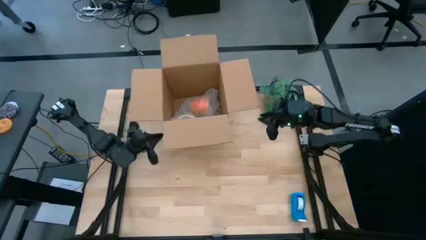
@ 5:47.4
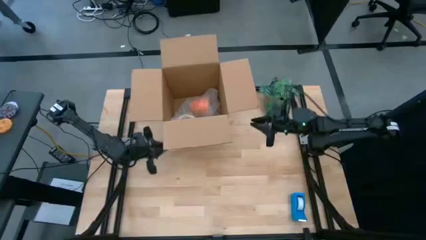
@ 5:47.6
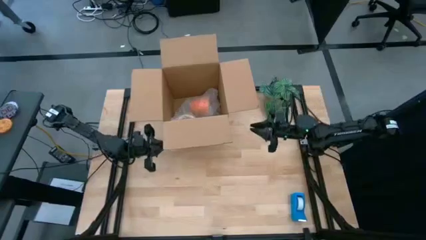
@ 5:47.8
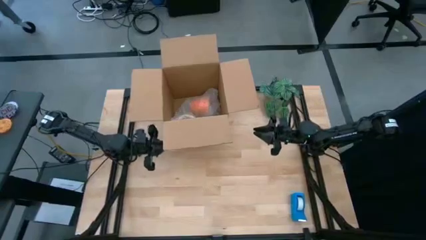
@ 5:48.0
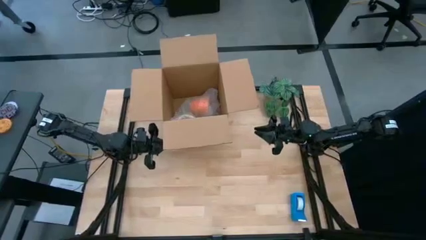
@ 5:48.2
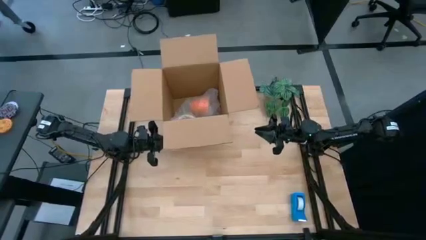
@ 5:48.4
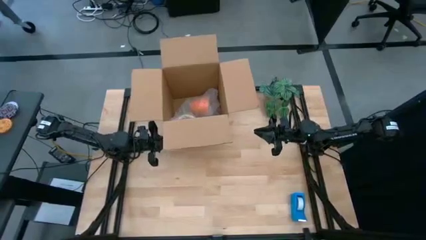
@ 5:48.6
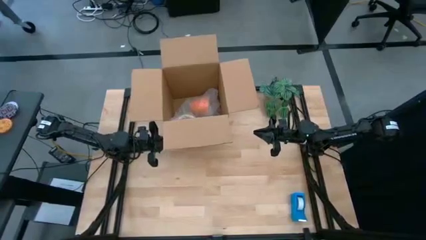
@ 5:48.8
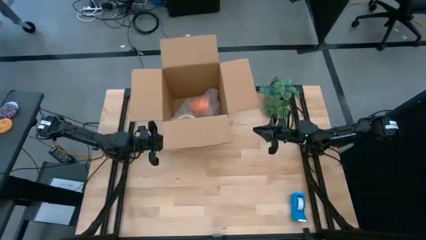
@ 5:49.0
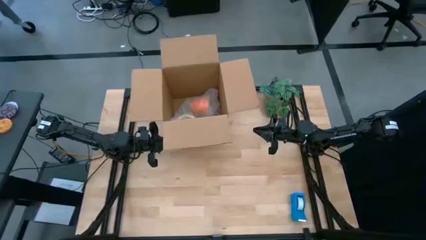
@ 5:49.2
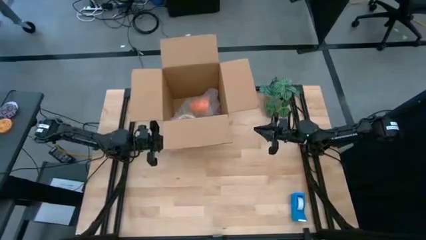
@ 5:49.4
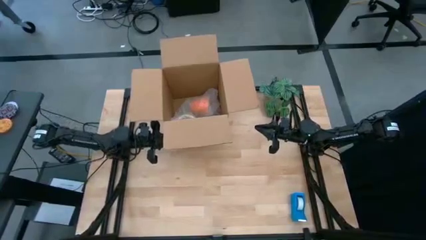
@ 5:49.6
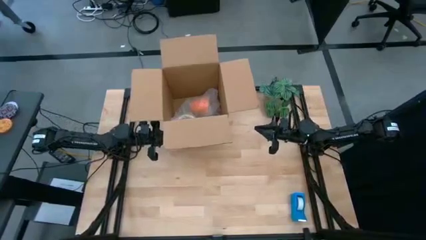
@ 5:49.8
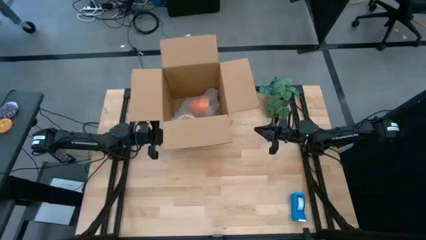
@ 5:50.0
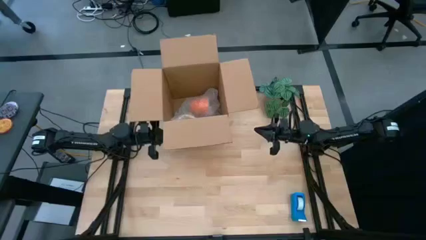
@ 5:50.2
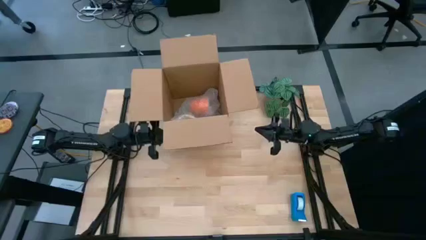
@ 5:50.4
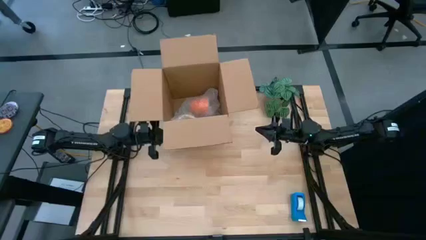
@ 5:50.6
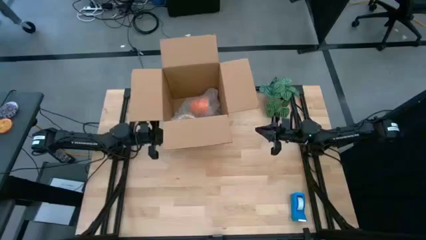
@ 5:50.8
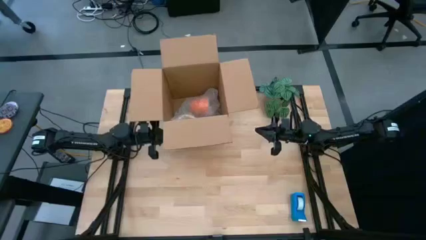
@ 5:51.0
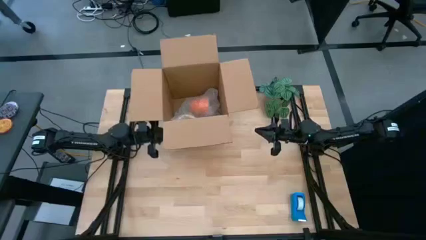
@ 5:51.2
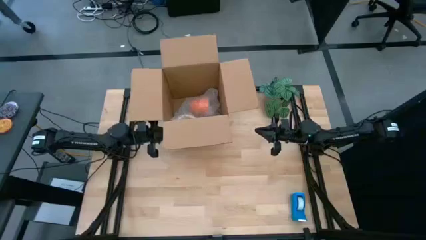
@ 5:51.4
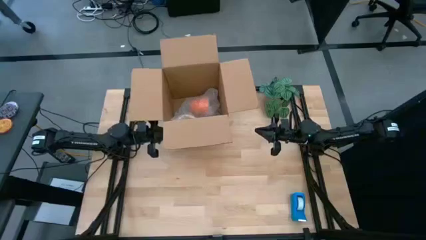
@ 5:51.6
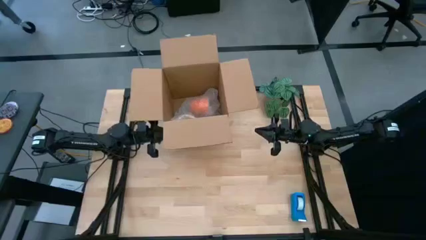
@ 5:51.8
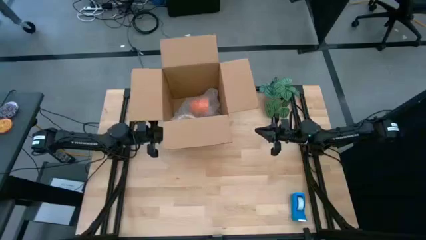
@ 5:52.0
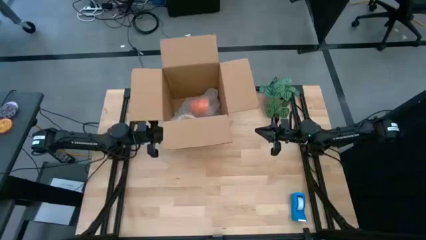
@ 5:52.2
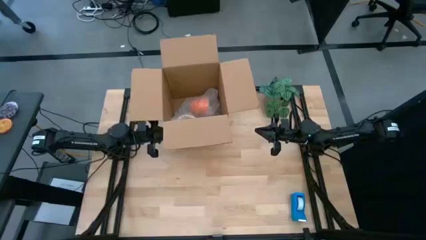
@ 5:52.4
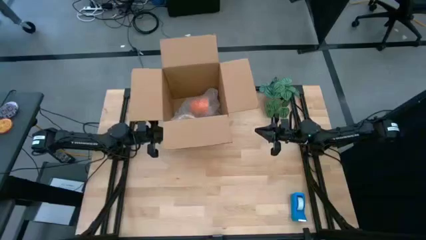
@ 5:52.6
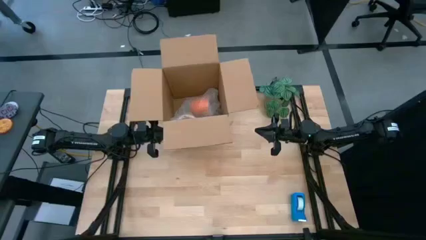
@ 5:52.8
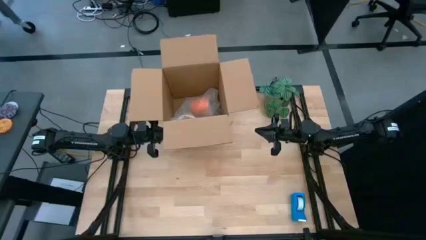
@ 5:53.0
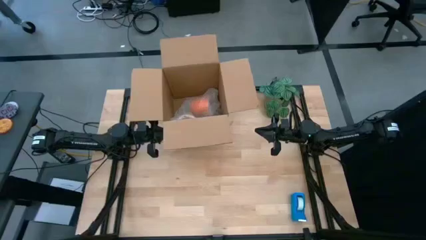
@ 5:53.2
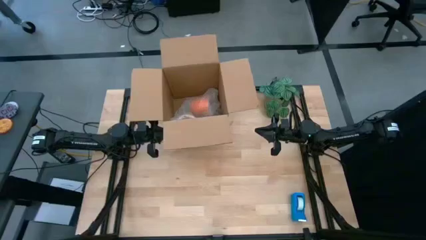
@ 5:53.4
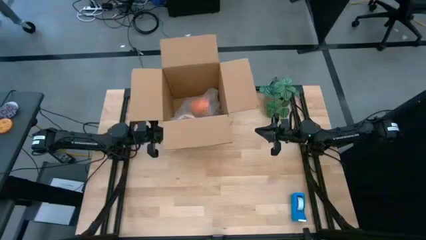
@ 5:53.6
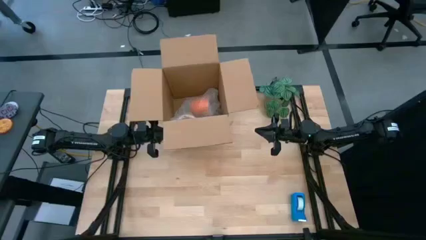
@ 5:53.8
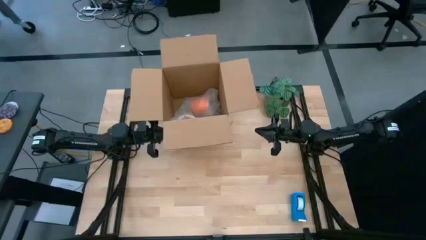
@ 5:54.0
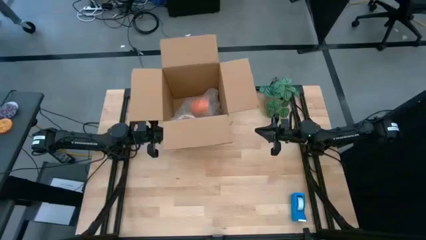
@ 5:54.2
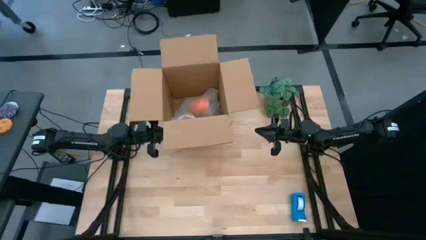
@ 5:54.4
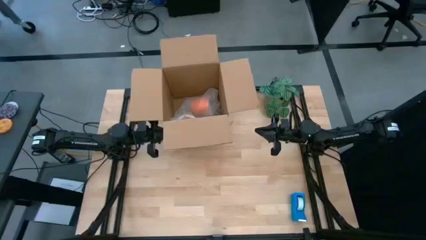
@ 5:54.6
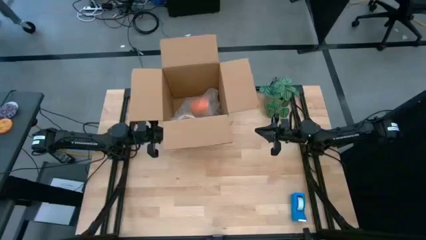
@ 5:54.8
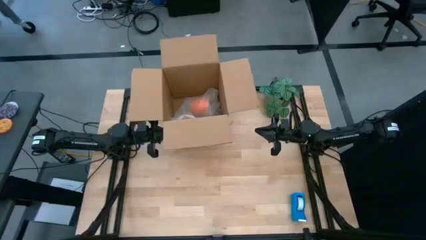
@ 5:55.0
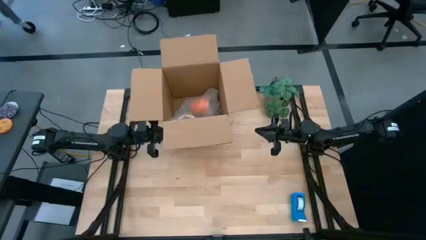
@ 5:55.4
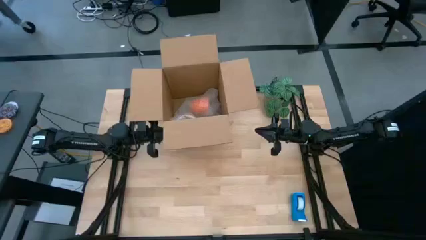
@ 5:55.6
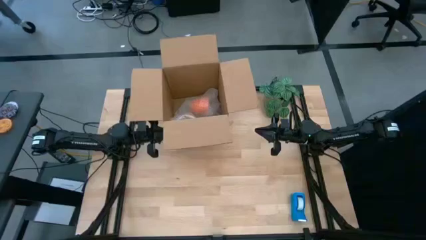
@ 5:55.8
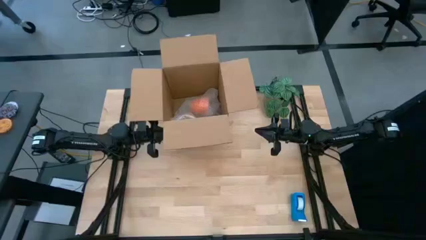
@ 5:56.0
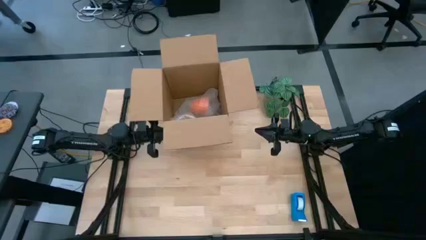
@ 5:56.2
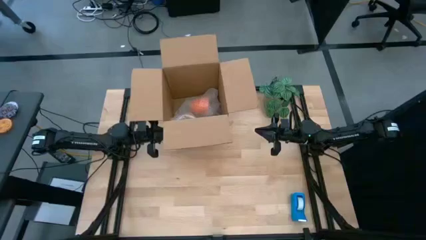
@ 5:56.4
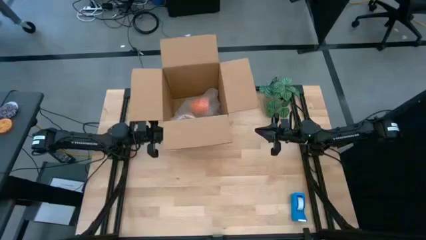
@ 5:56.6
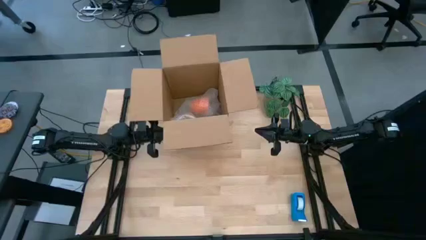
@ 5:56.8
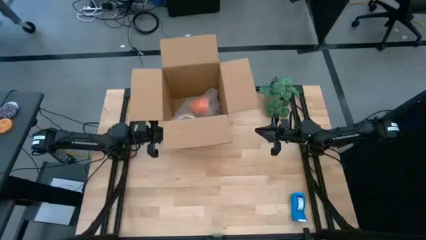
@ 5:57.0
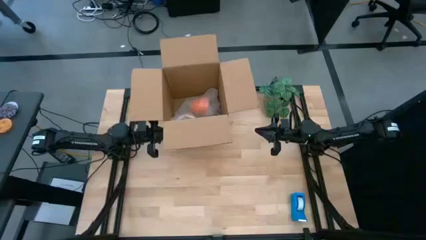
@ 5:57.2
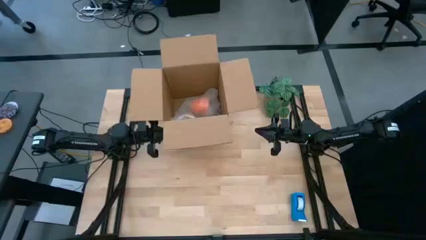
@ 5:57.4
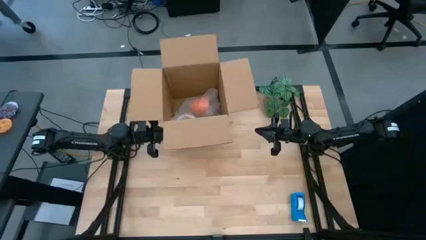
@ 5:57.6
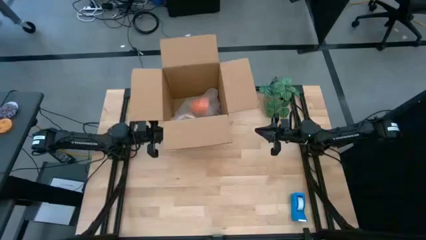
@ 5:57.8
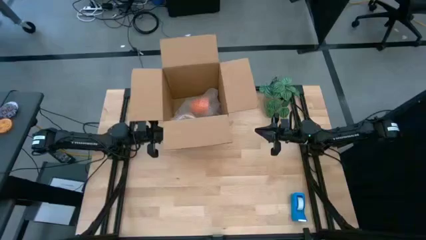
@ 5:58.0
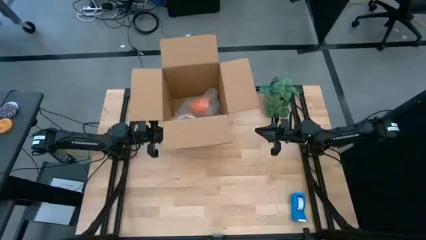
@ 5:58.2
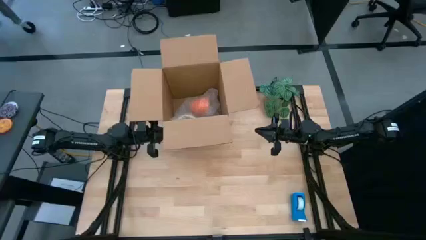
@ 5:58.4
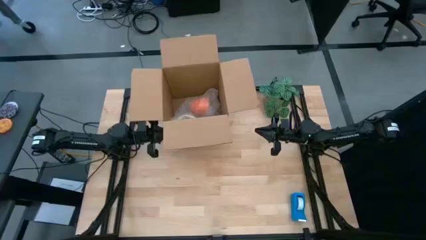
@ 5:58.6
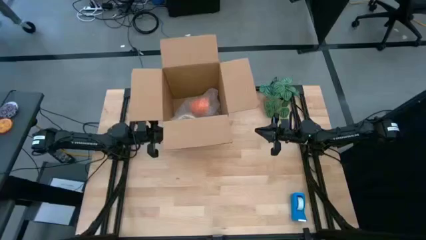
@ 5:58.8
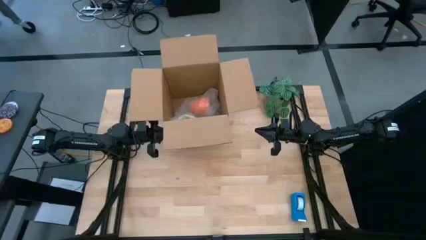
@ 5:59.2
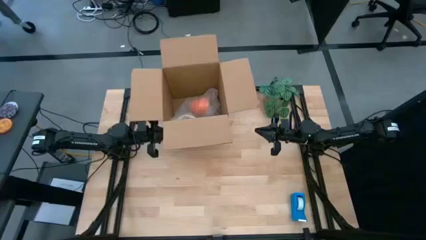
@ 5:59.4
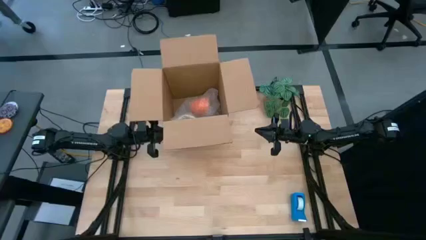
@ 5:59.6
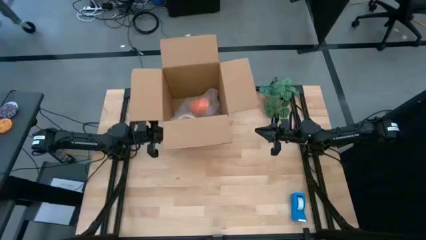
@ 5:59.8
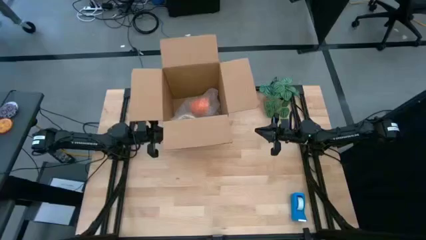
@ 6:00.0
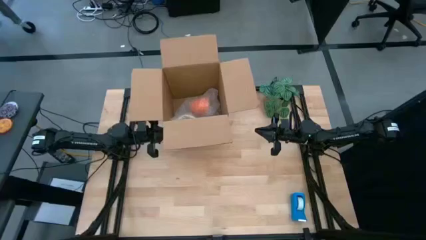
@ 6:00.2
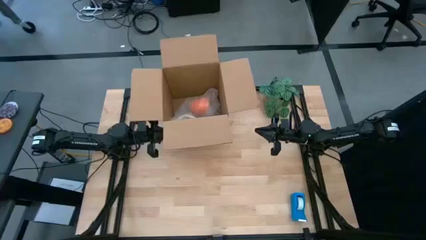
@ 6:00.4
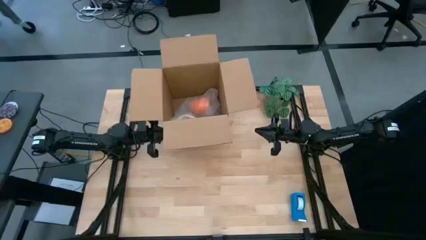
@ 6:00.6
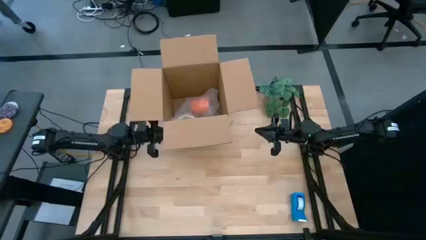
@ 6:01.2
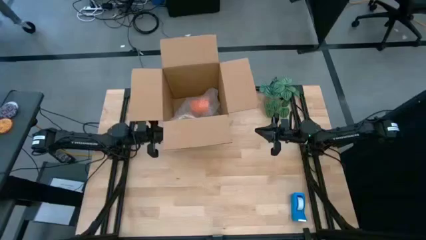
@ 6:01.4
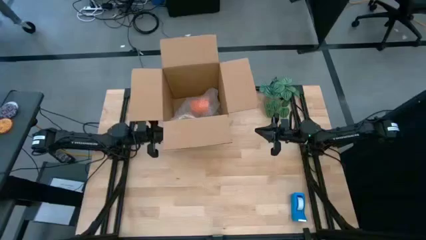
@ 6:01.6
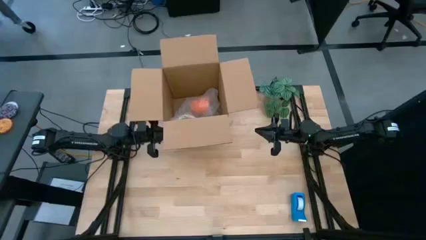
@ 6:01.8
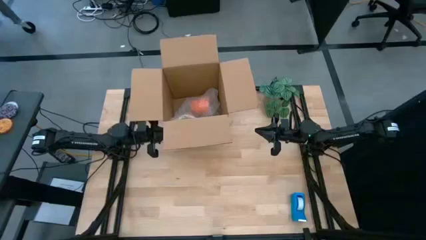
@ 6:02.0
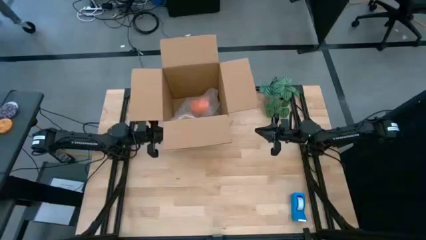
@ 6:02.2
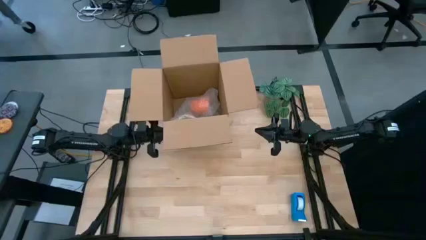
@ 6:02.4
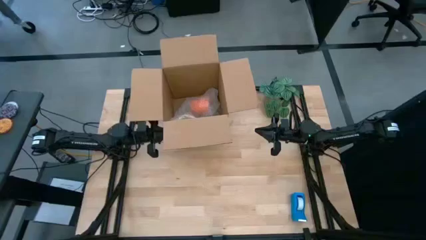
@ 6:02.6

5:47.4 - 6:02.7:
Task: wrap mug
Return to Home Position

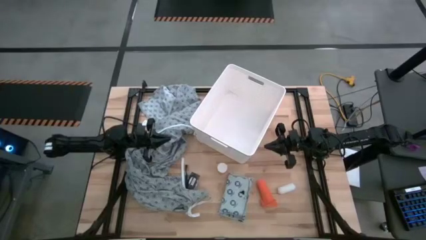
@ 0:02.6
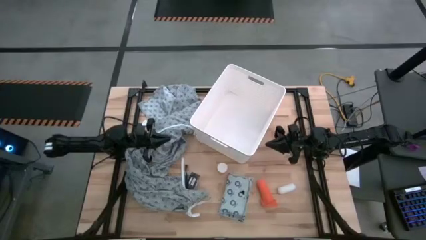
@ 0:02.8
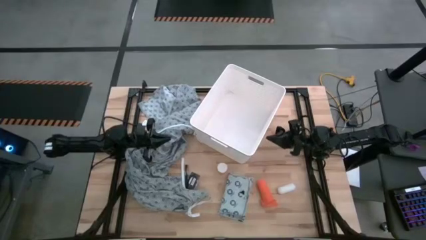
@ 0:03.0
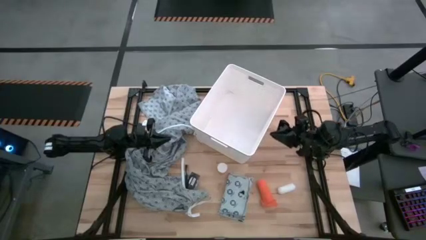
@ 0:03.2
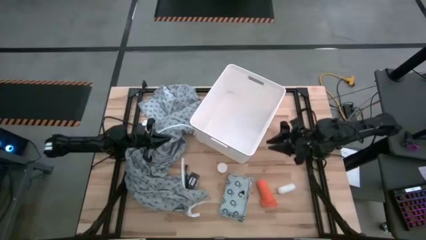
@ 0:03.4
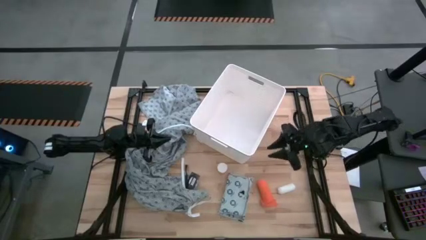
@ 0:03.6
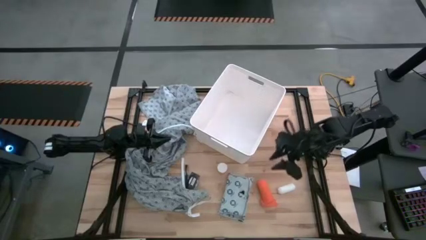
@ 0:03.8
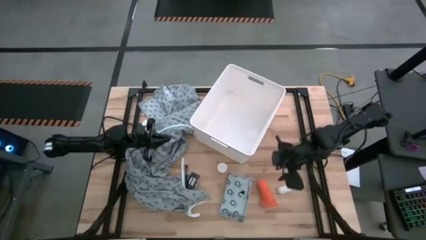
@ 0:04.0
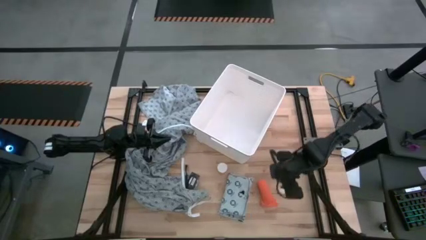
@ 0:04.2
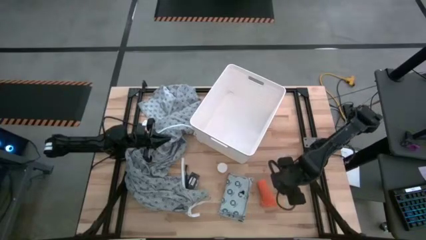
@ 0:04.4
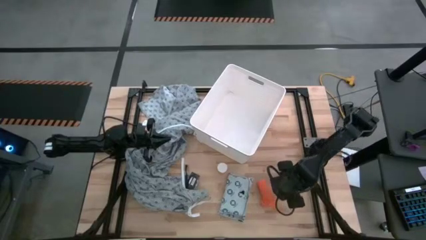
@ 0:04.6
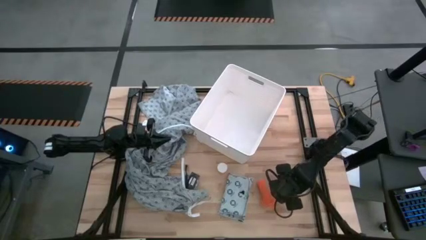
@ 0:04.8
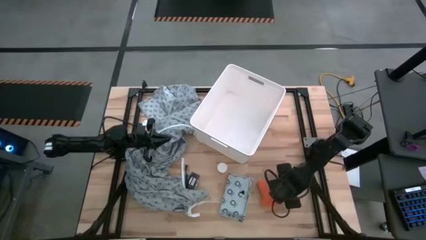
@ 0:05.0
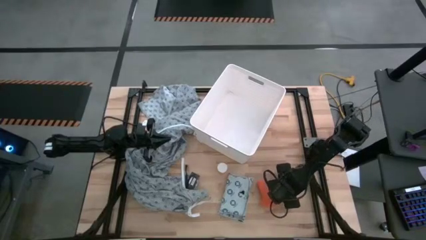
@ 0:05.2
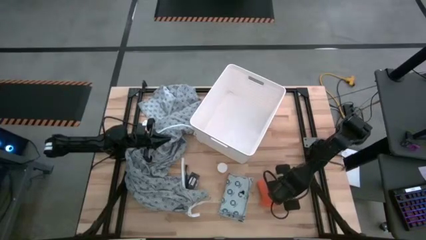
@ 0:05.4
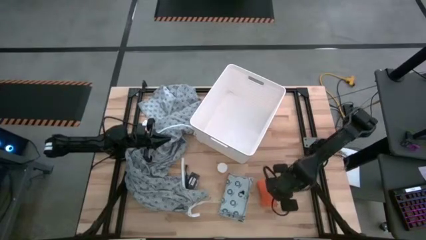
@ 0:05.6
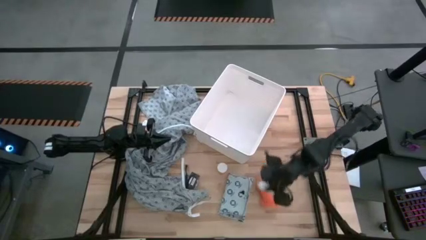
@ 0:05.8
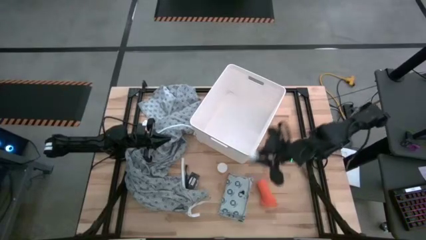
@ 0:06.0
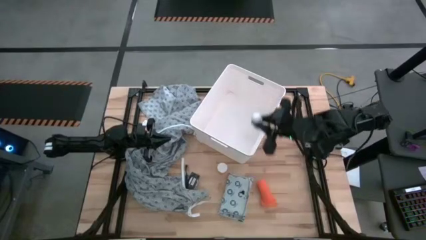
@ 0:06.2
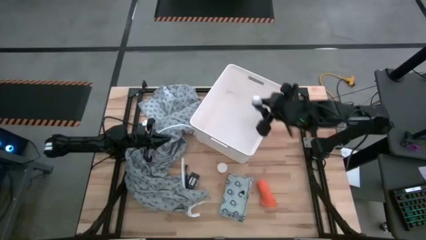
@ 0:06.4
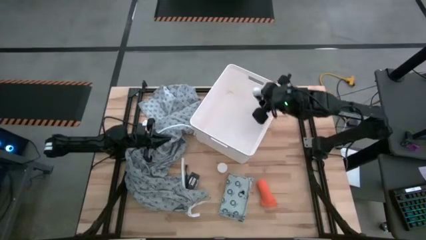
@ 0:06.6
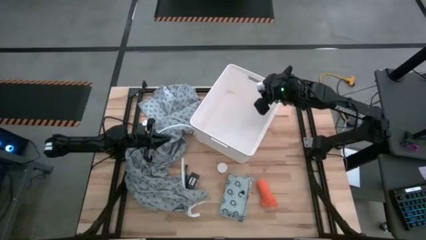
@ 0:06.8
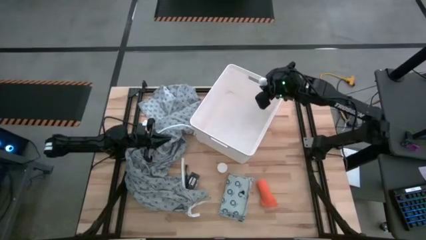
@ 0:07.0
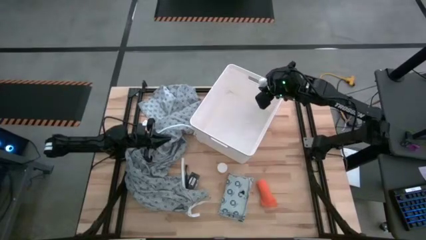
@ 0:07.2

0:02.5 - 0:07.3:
Task: Pick & place medical supplies in basket/bin
Put the white rolled gauze into the white bin
